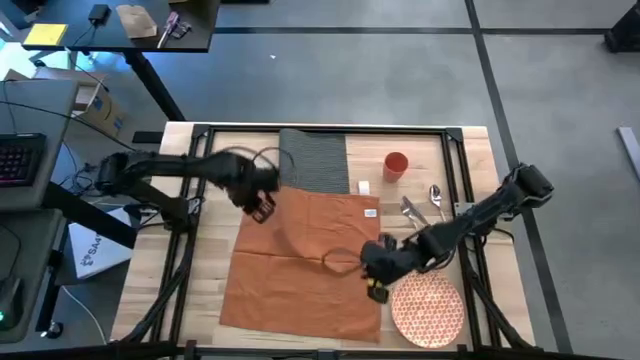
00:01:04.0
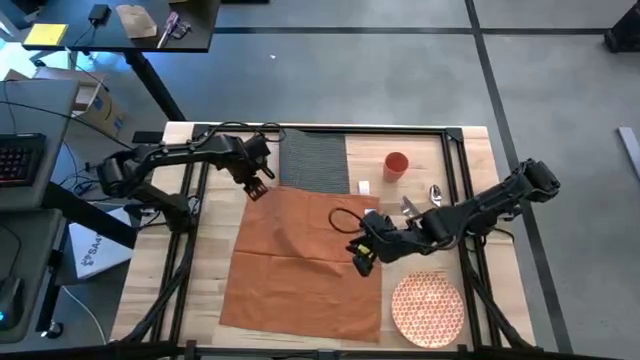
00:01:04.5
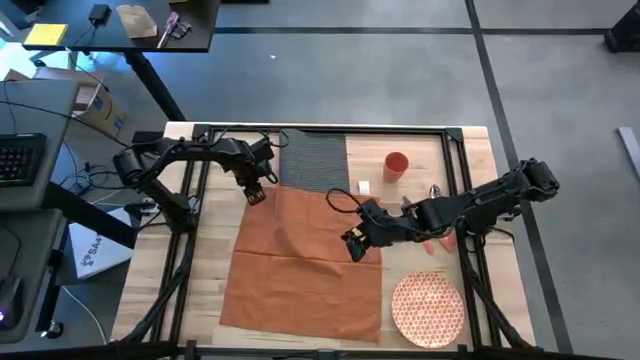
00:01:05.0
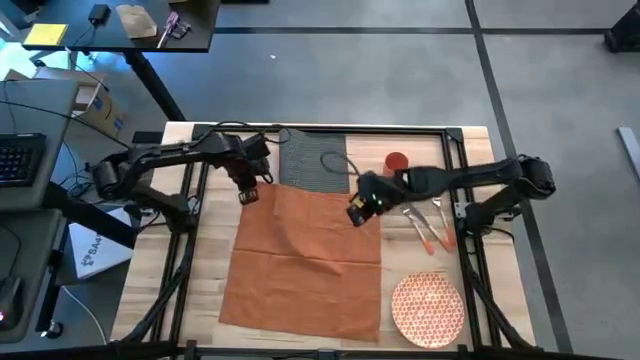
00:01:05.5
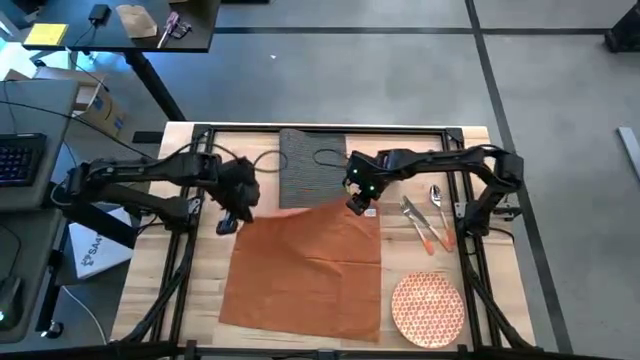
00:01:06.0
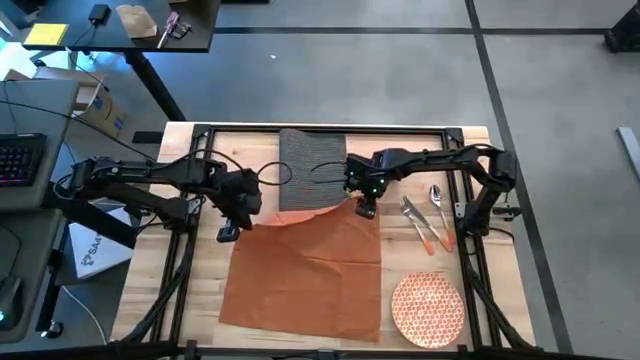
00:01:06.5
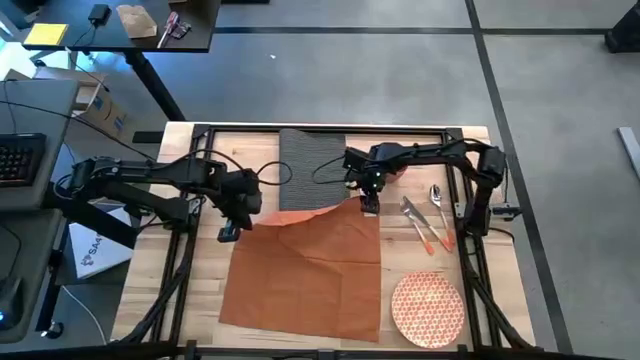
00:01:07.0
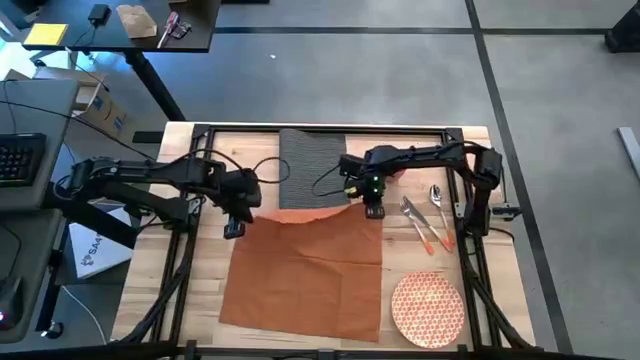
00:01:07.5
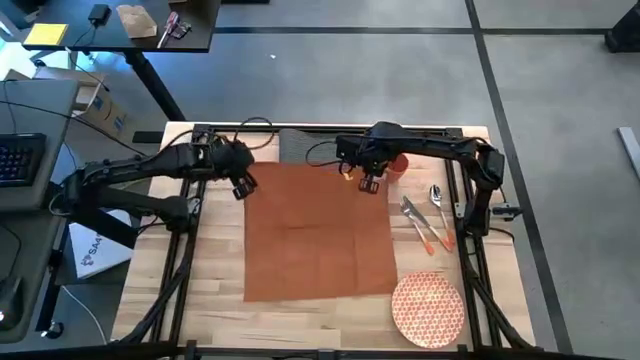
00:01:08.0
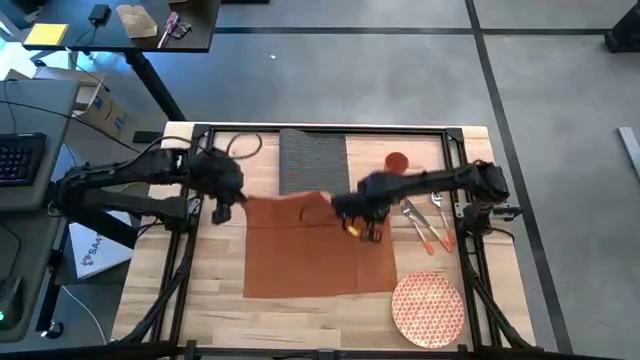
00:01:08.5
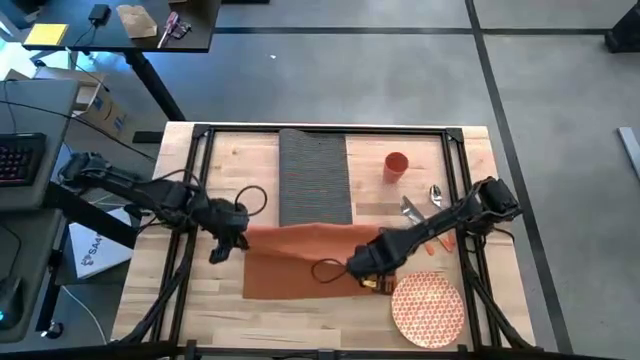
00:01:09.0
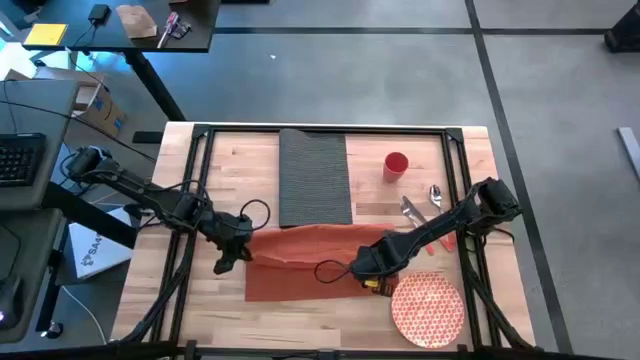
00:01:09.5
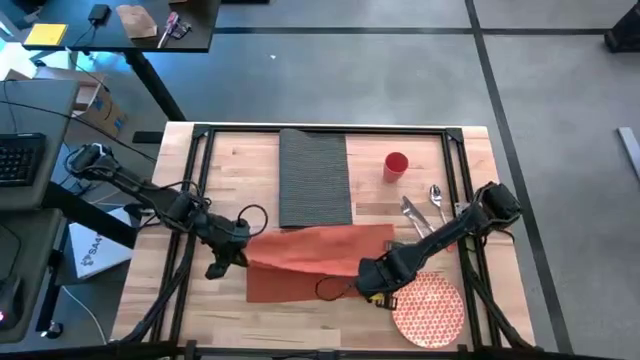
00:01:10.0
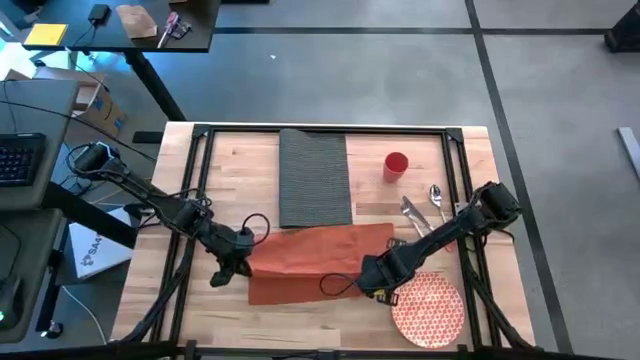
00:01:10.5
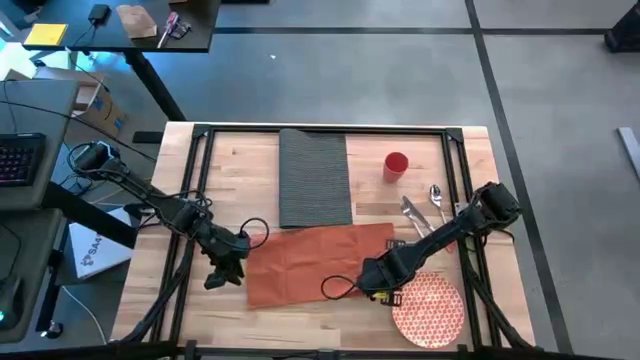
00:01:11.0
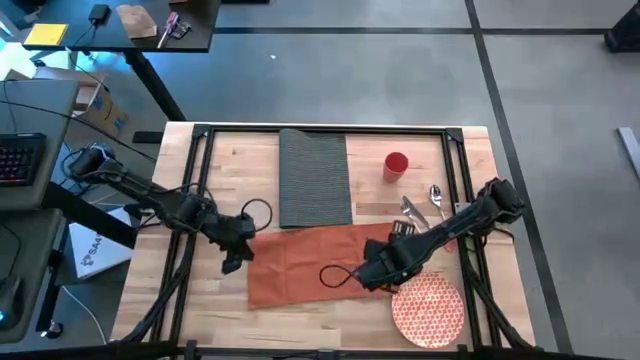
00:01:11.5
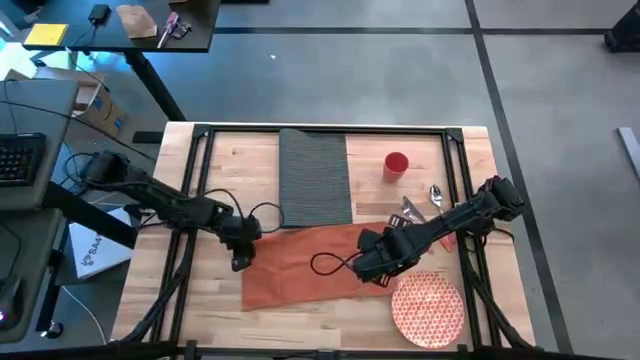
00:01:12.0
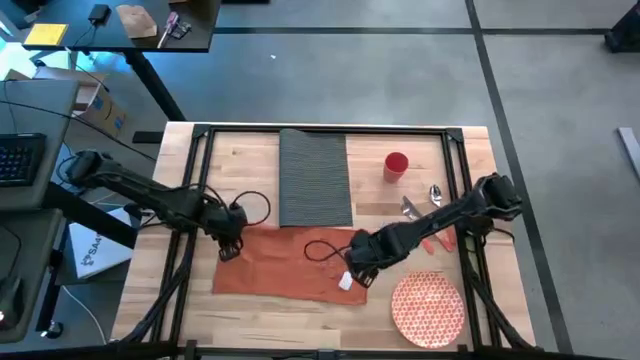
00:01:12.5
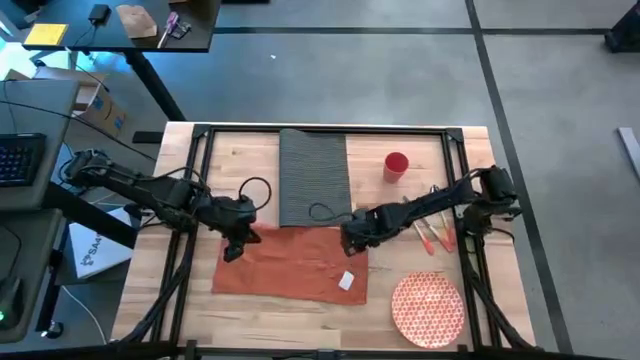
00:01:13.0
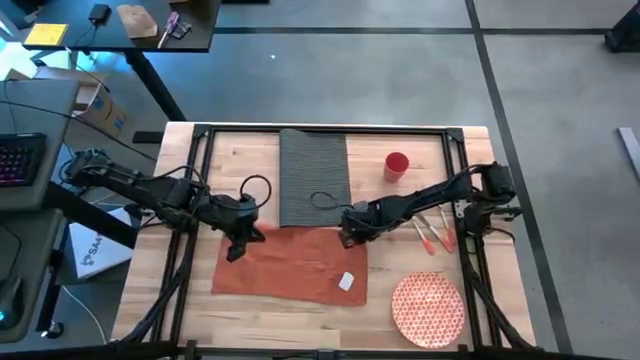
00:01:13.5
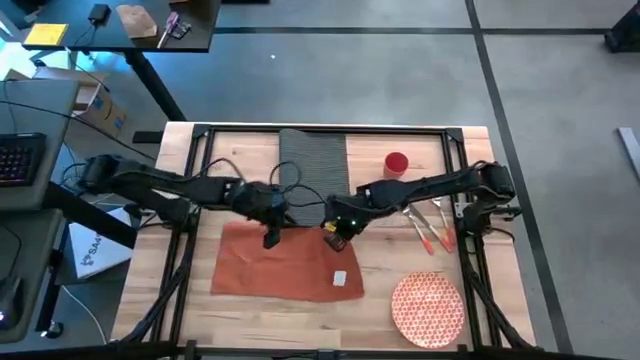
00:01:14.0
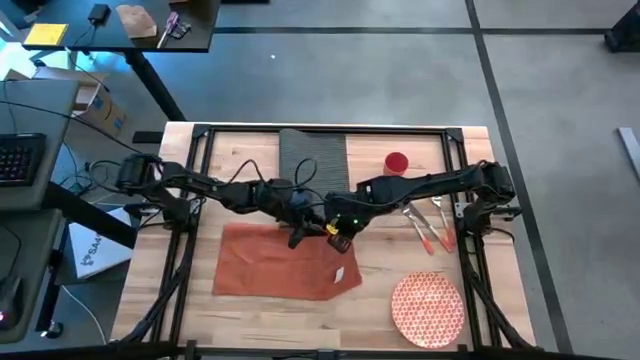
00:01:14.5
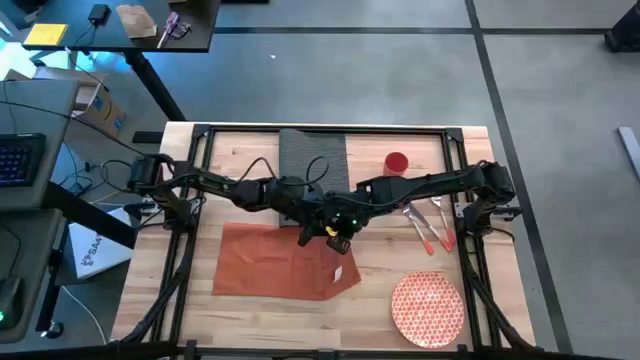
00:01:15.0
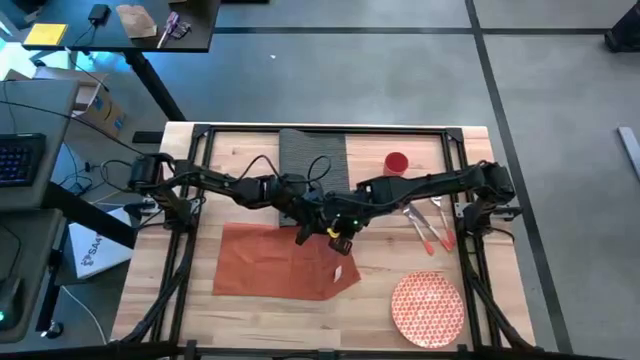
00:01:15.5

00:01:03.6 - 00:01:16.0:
Task: Set table place
Fold the orange napkin

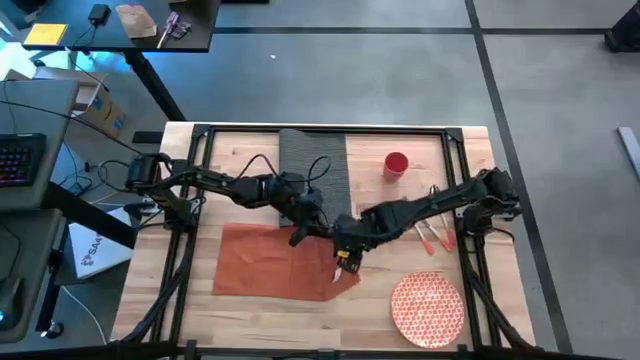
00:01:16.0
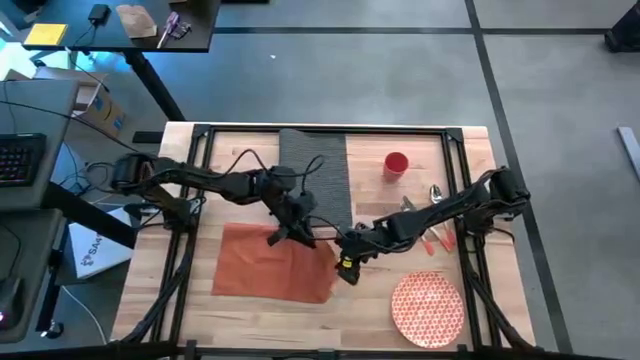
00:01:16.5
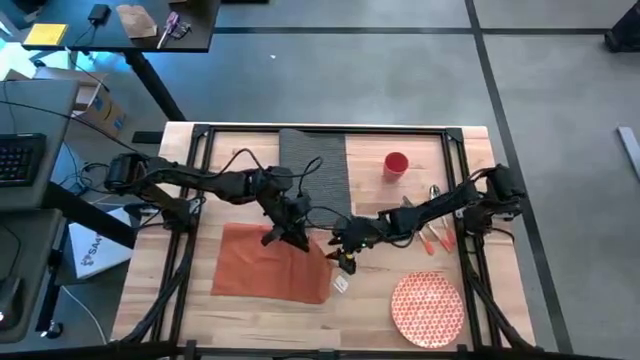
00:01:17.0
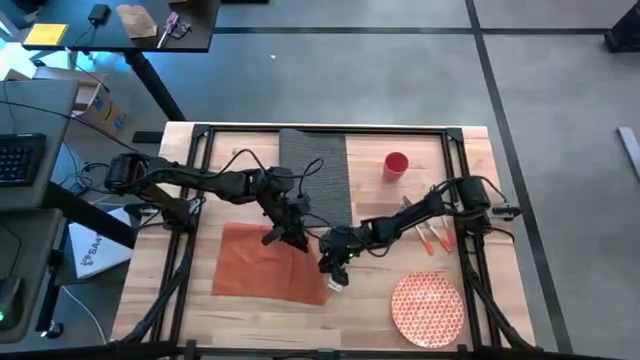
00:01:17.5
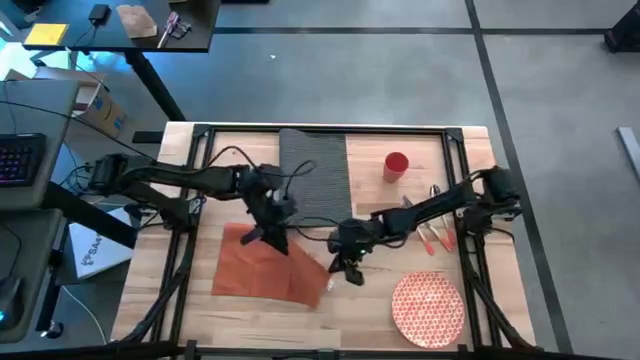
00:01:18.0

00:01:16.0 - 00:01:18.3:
Fold the orange napkin

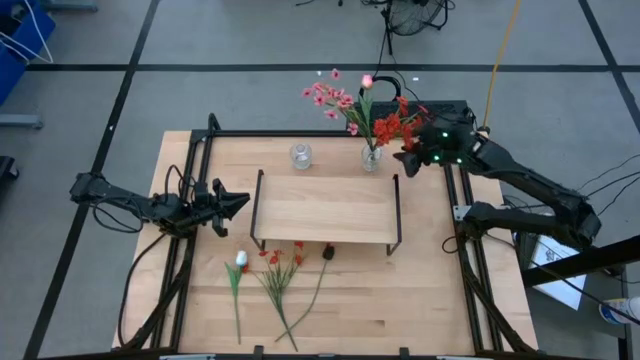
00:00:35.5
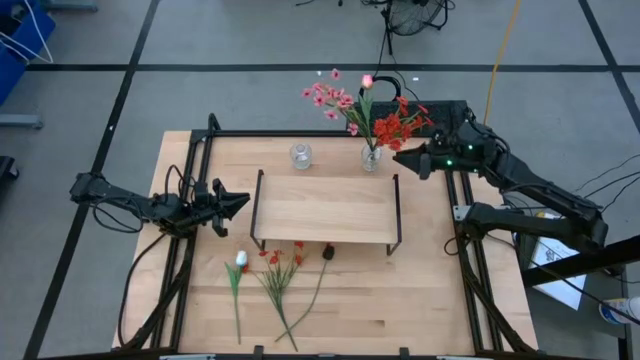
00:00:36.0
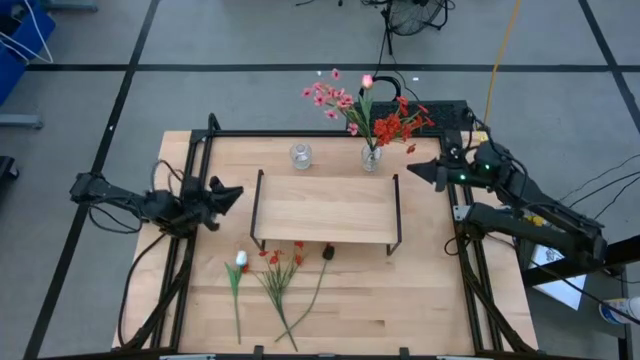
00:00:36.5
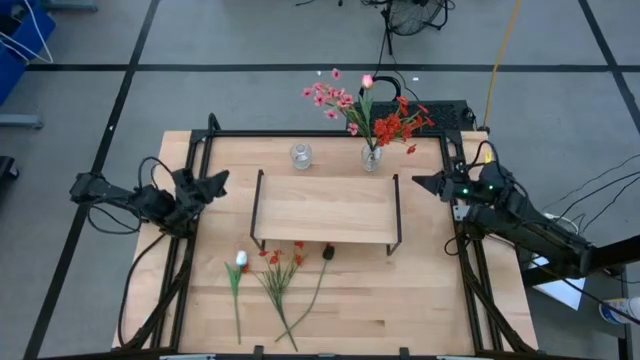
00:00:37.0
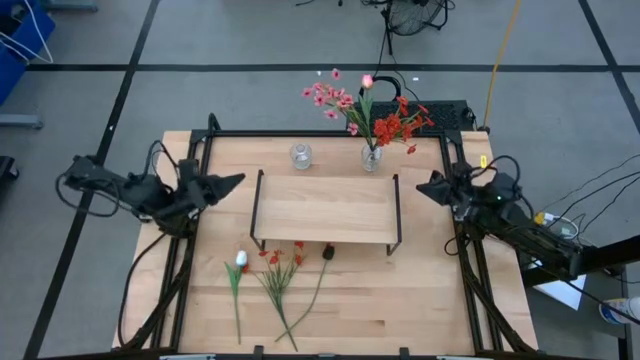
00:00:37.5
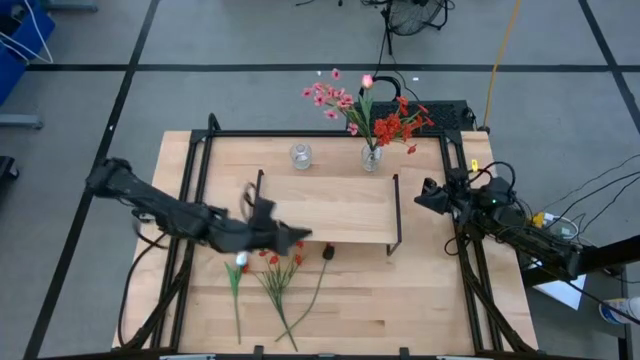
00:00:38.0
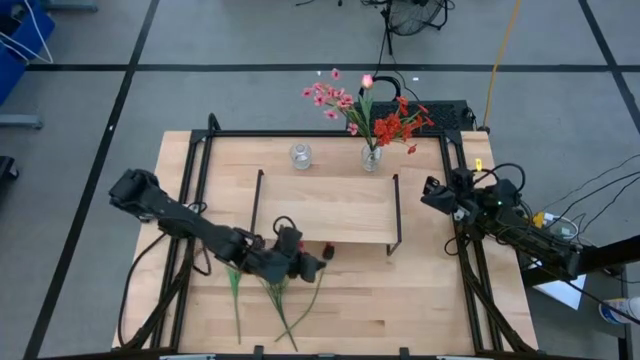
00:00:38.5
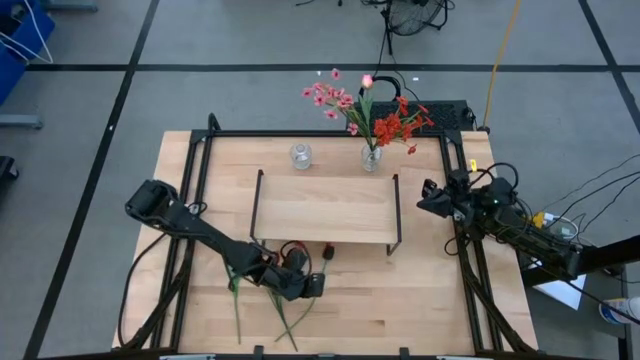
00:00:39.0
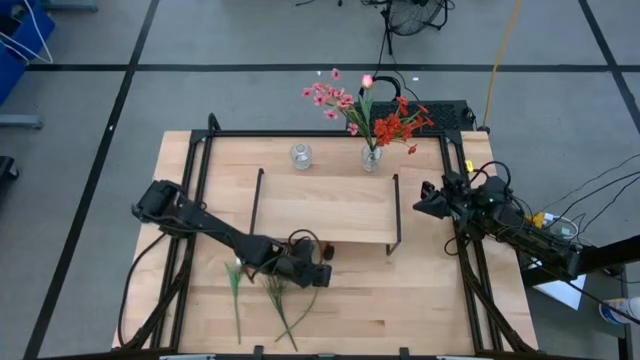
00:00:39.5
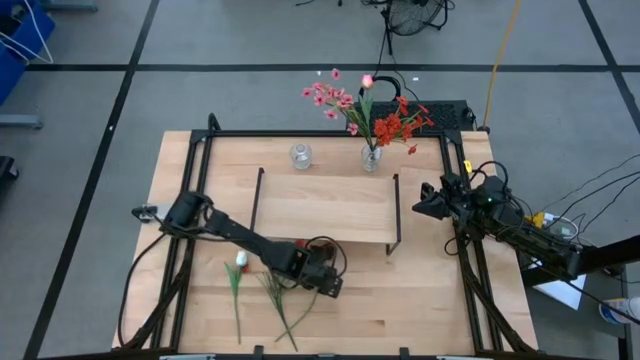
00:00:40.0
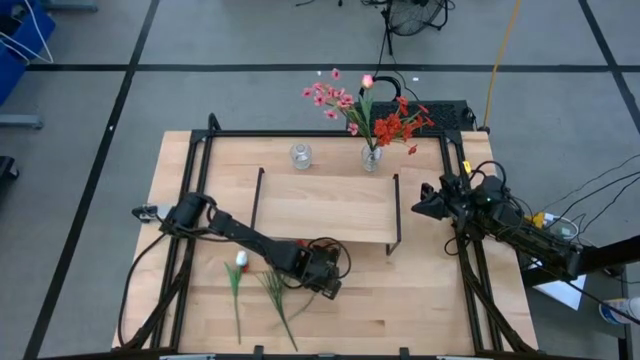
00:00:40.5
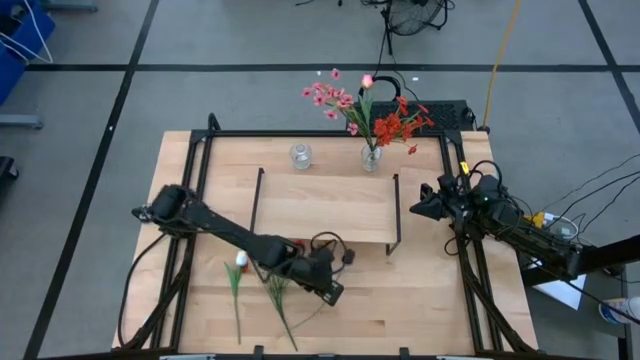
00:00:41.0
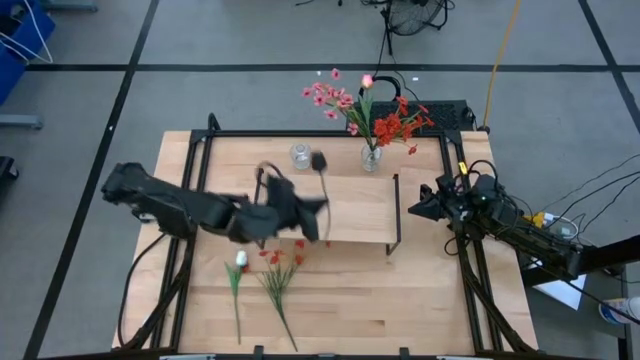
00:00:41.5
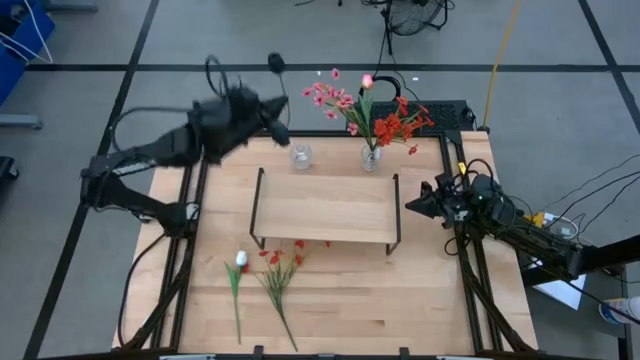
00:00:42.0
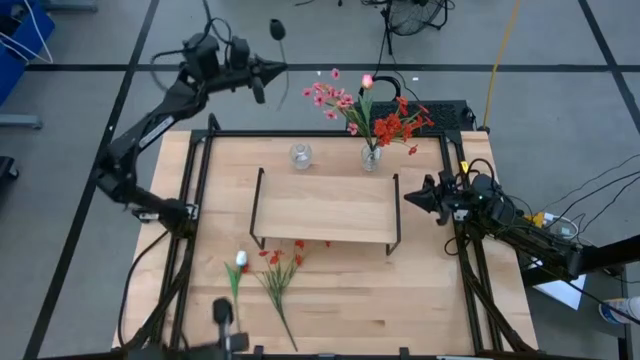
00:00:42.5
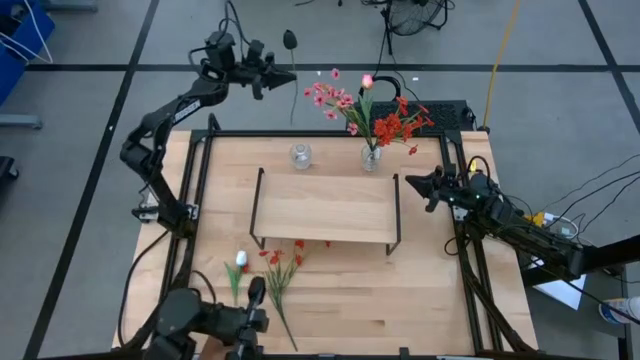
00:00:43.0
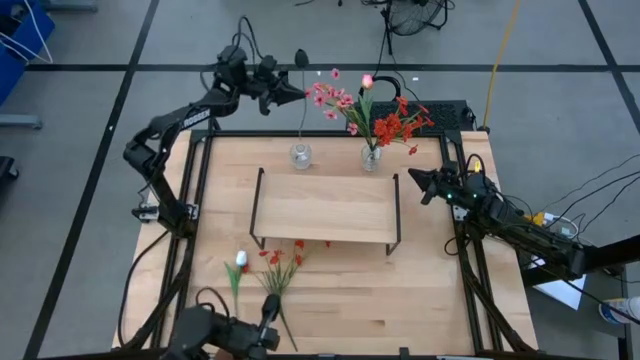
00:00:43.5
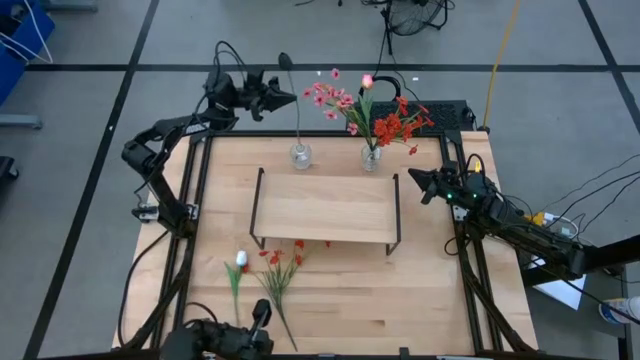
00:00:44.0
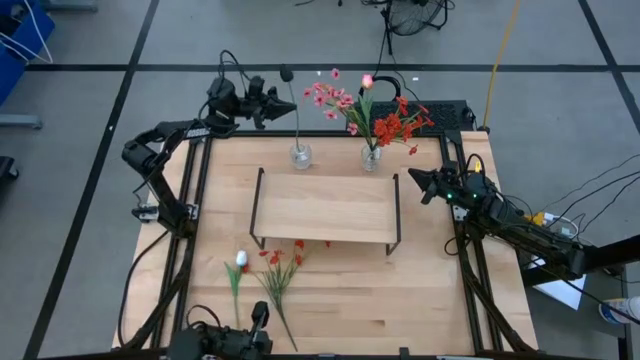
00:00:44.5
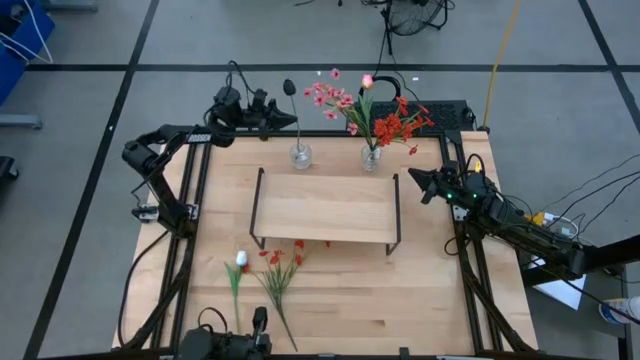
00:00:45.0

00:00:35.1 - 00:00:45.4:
Task: Pick and place flowers into a vace then onto a shelf
Put the black tulip into the left transparent flower vase
